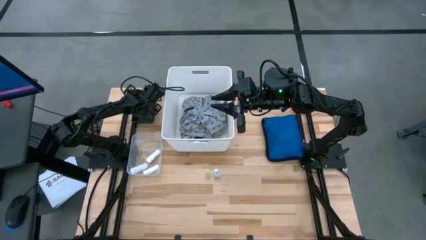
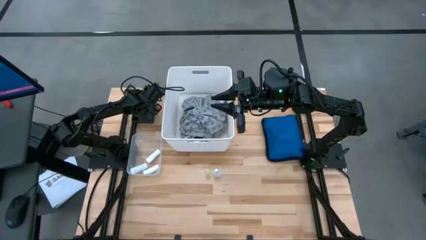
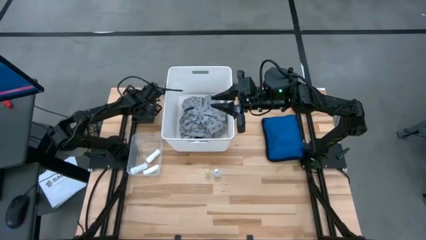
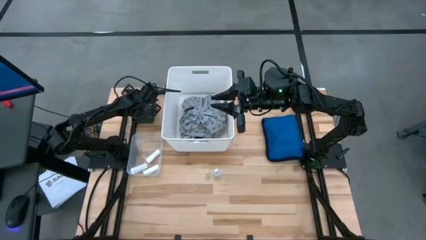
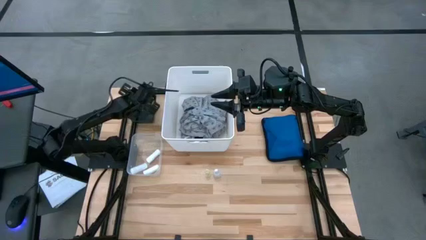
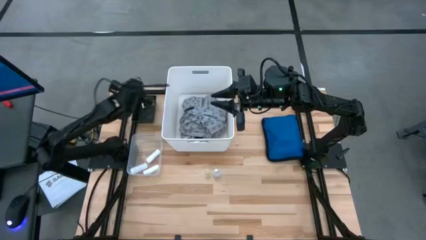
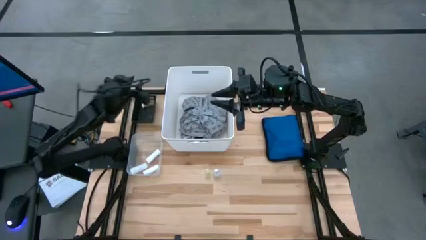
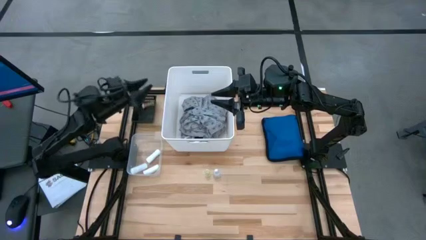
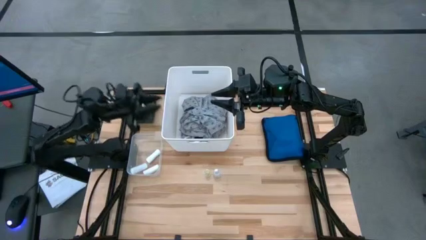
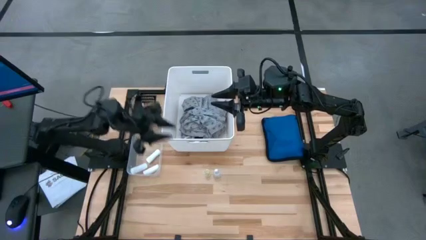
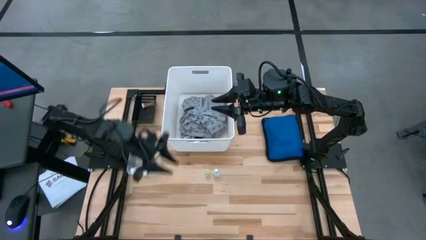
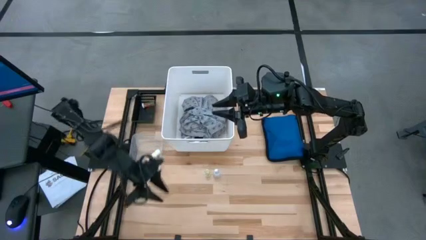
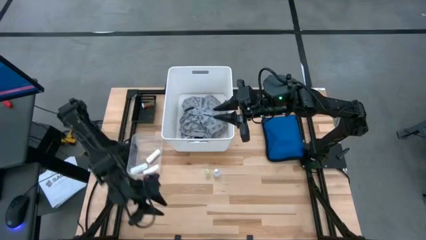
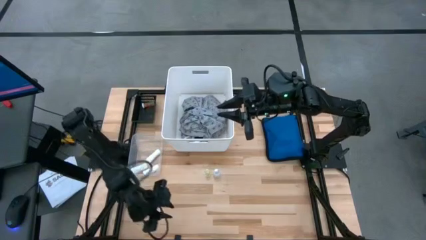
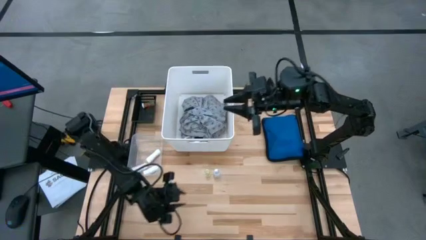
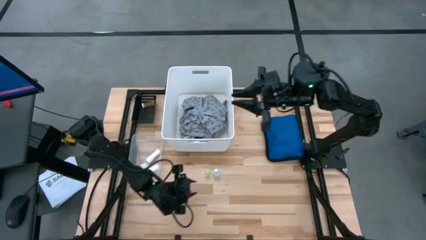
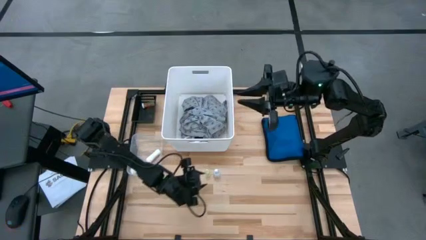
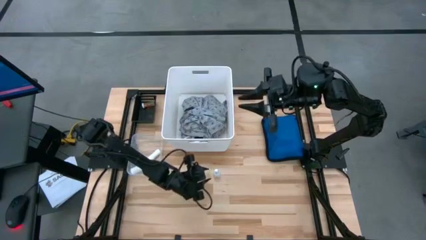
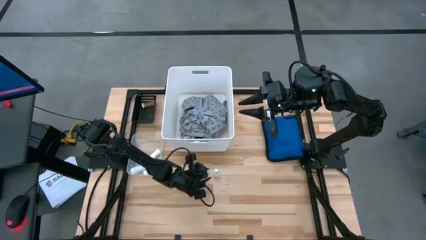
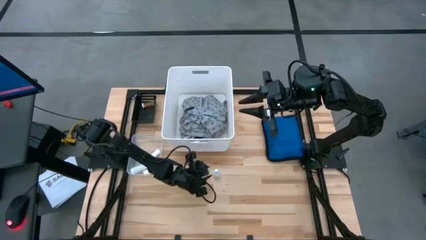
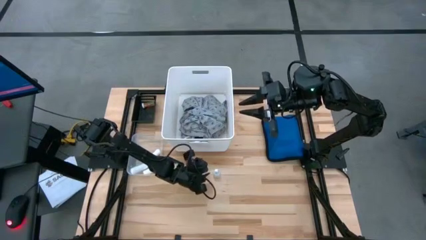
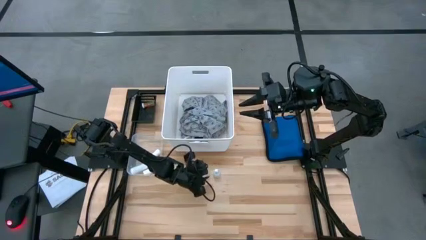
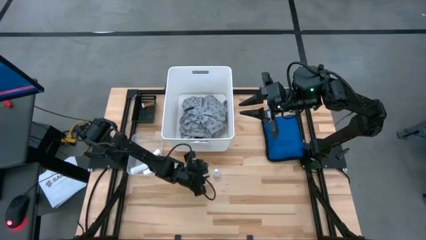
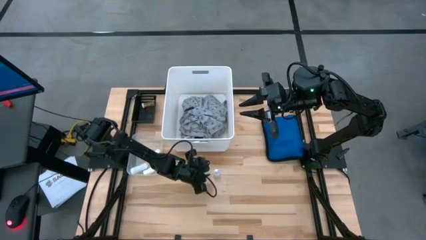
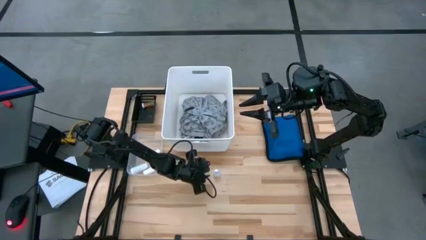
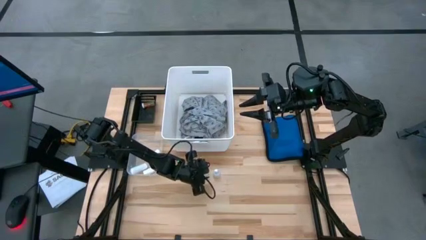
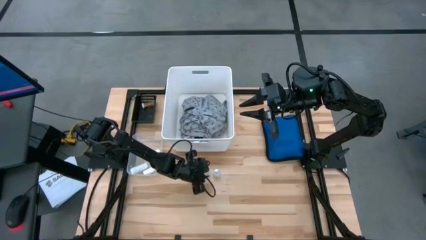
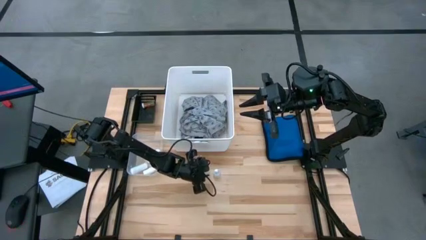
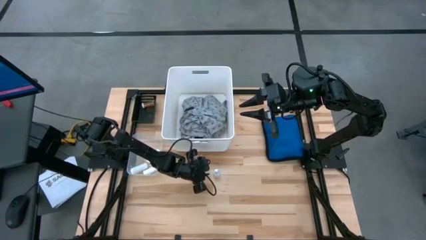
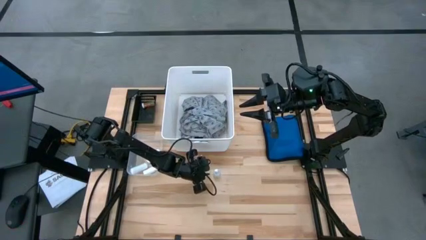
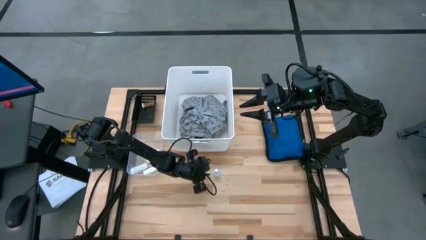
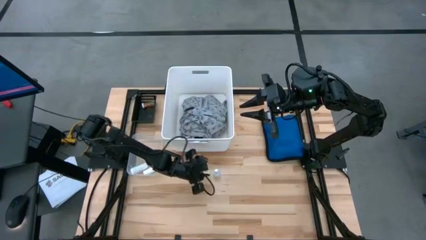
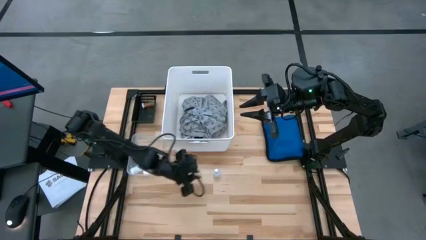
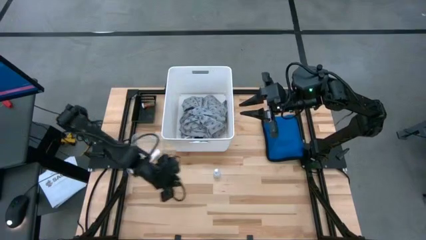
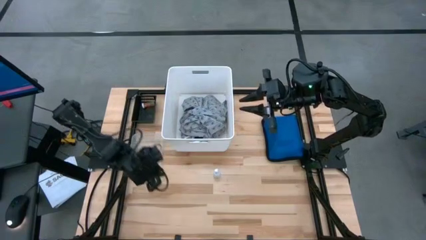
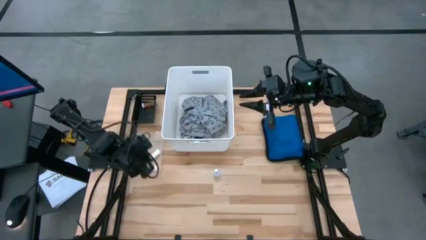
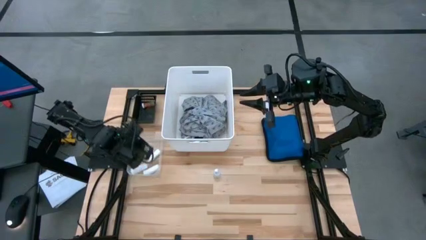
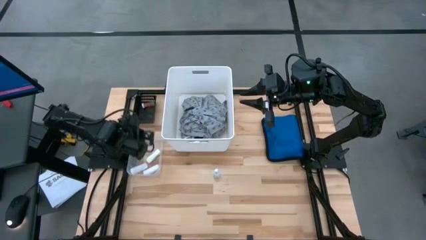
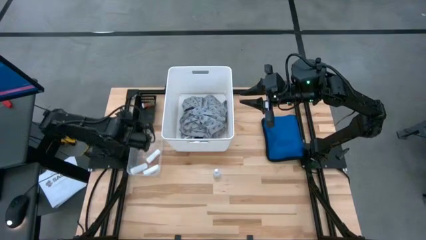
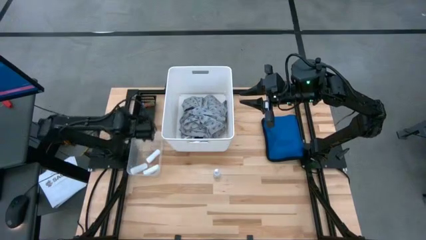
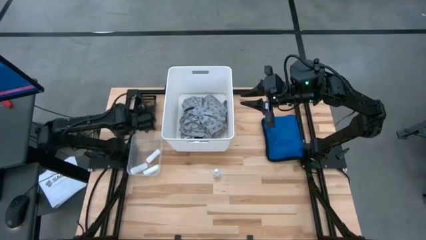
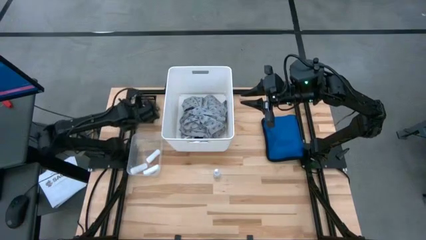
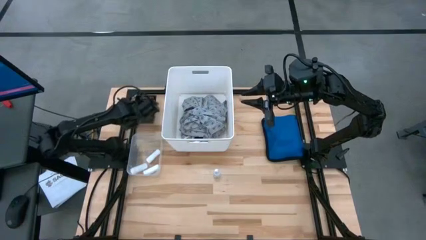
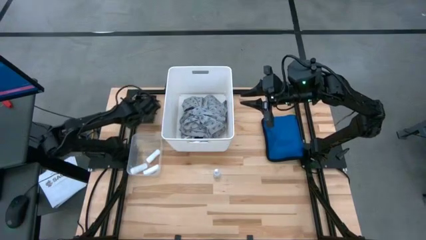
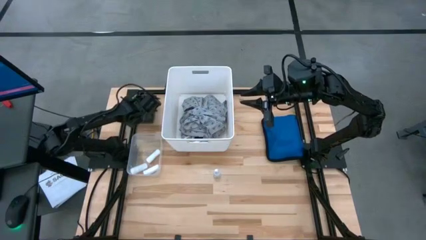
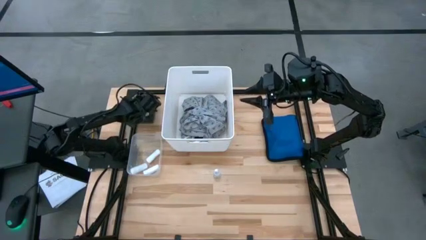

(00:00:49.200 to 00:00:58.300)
Task: Pick & Place Medicine items
Put the yellow pill bottle into the black bin

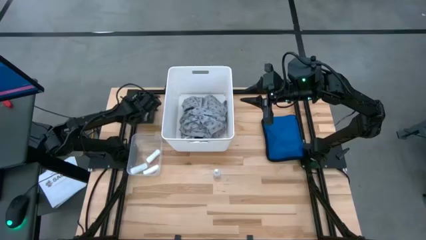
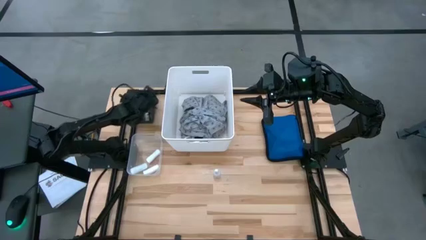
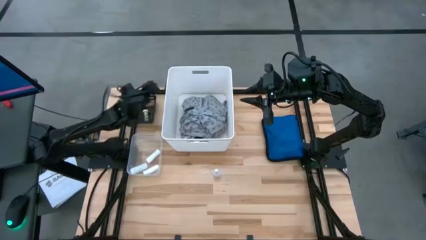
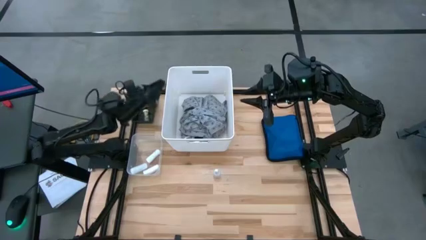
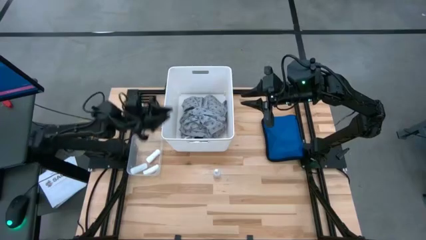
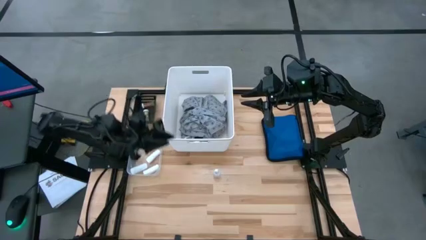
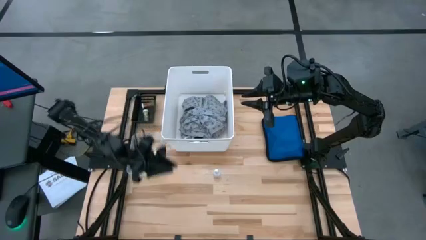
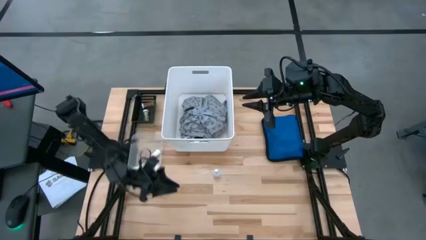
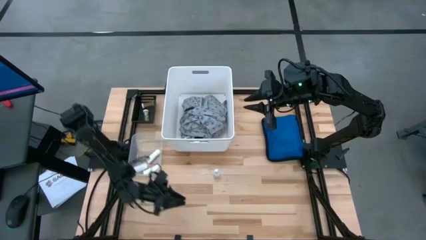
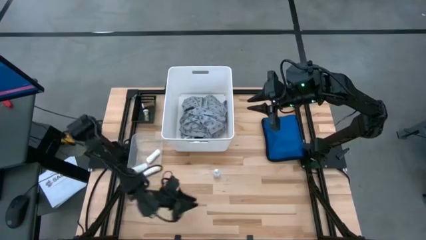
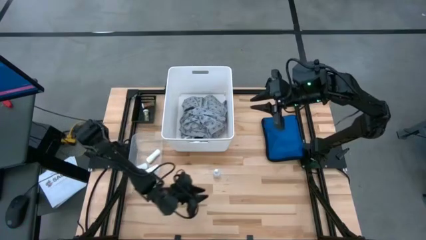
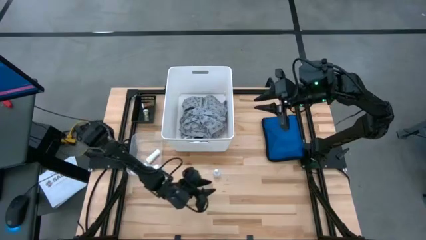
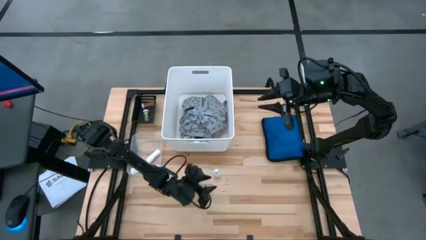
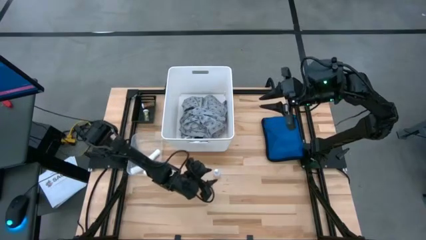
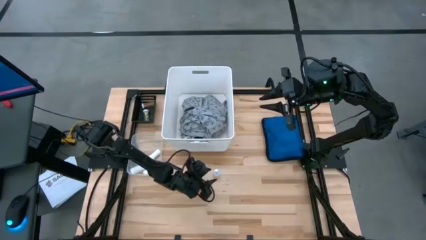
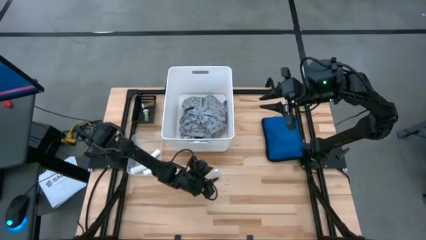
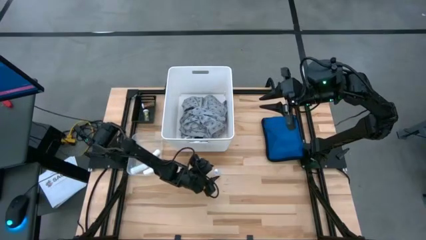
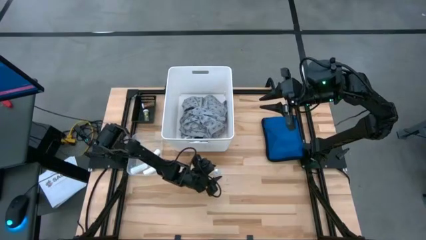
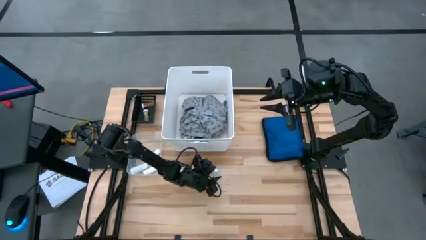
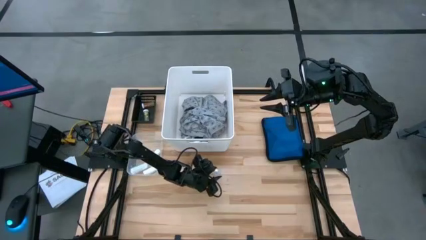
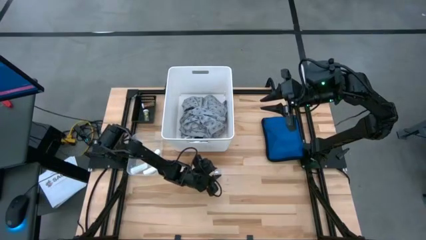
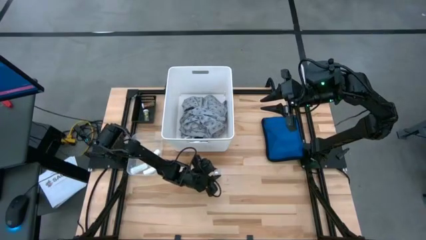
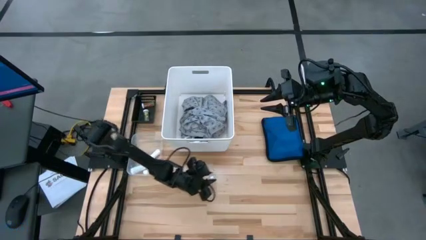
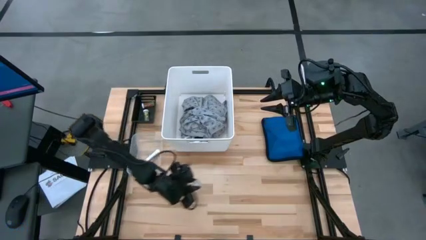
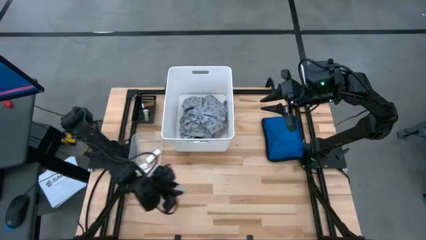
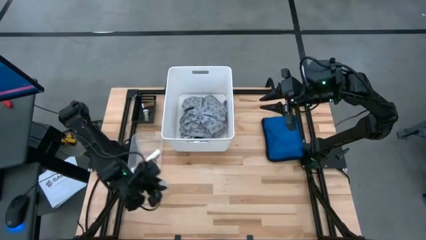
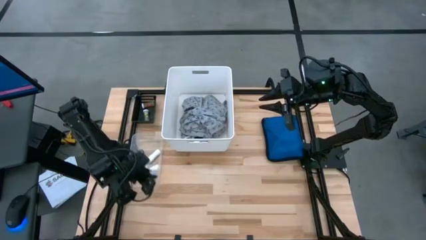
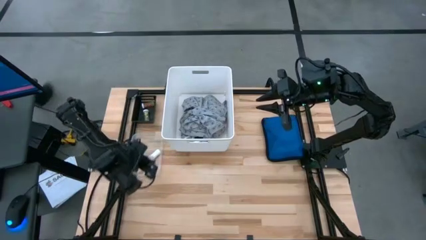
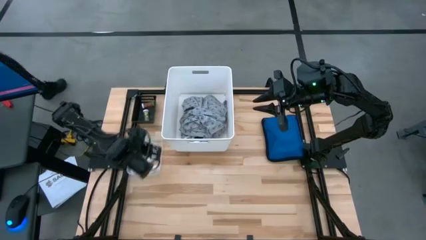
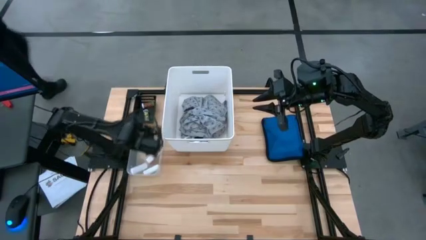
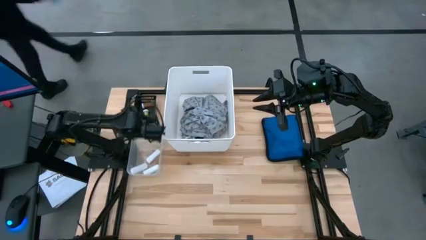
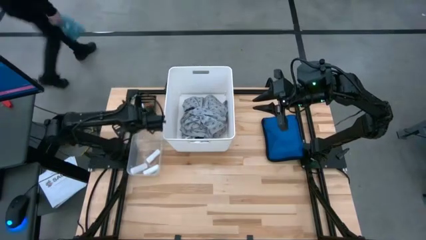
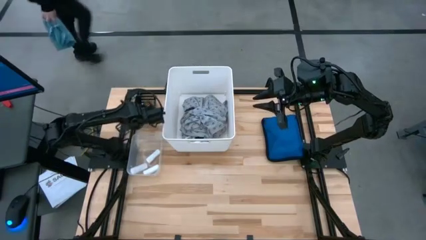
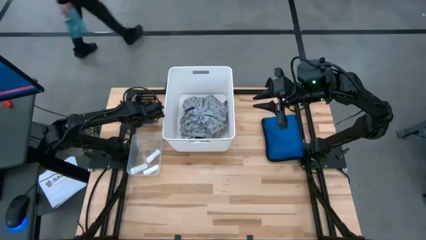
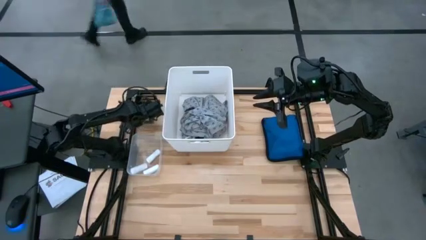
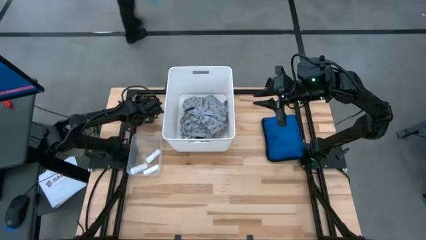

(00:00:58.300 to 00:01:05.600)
Put the transparent pill bottle into the black bin
